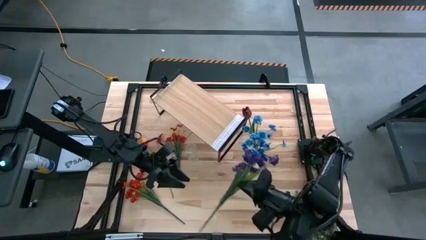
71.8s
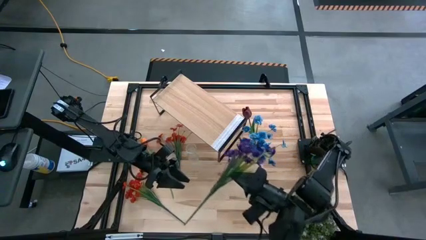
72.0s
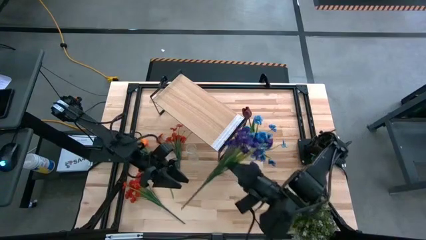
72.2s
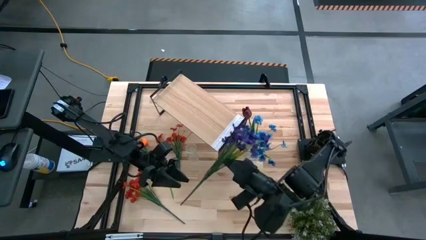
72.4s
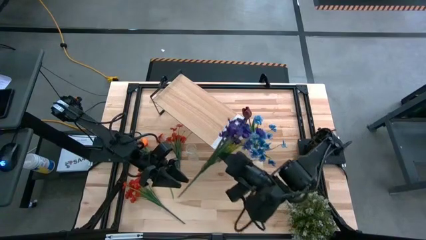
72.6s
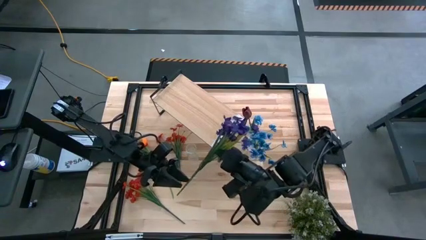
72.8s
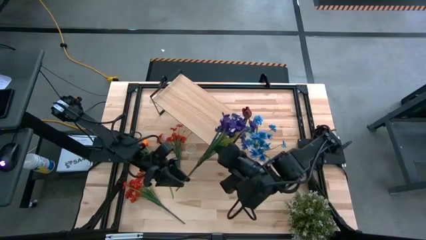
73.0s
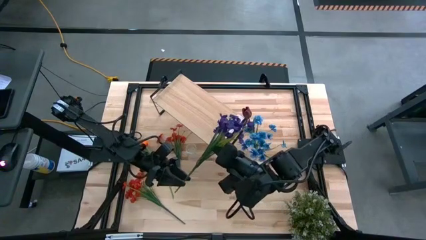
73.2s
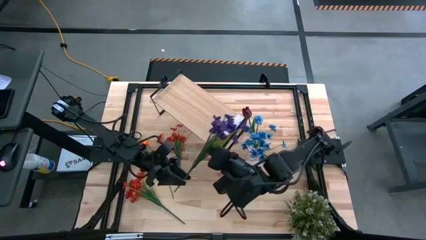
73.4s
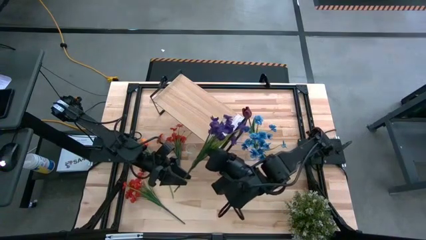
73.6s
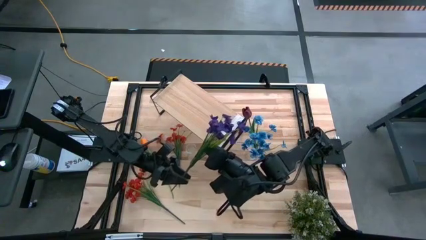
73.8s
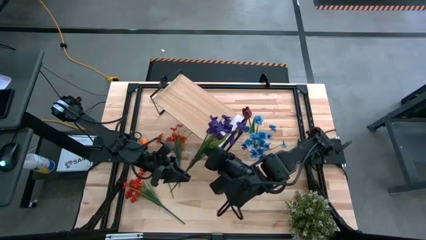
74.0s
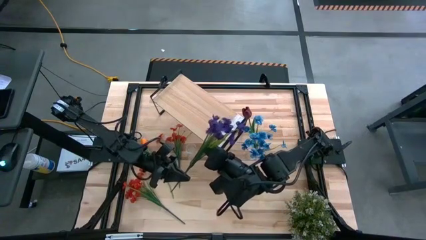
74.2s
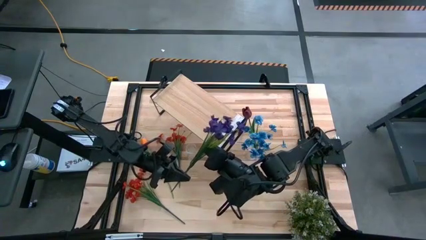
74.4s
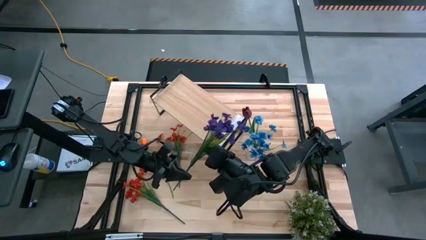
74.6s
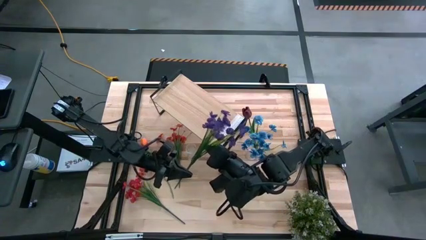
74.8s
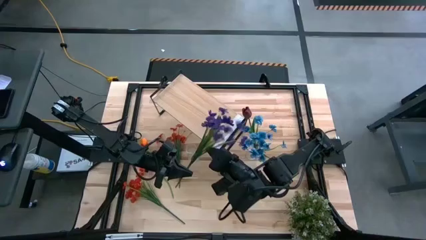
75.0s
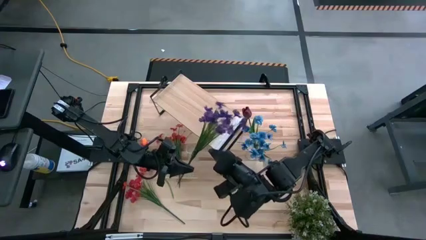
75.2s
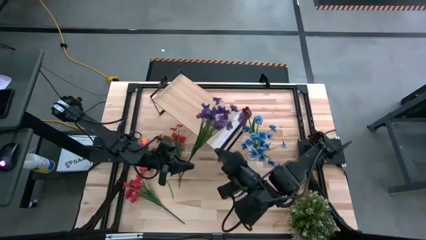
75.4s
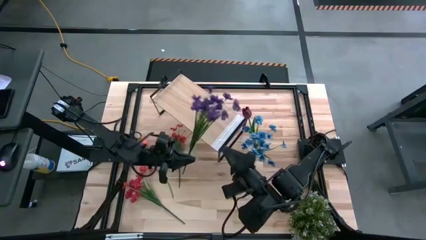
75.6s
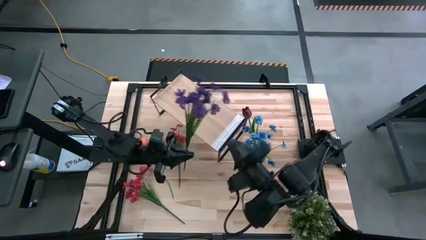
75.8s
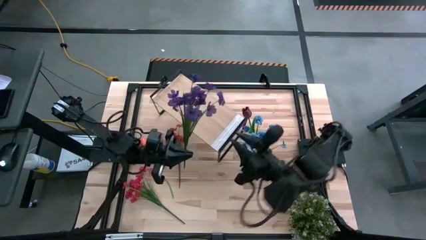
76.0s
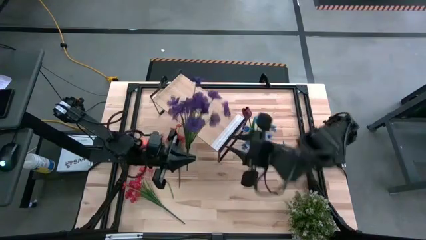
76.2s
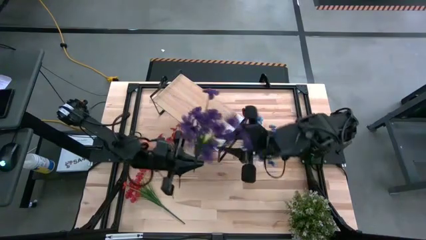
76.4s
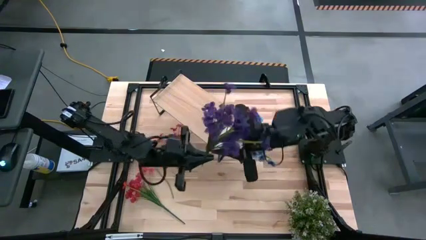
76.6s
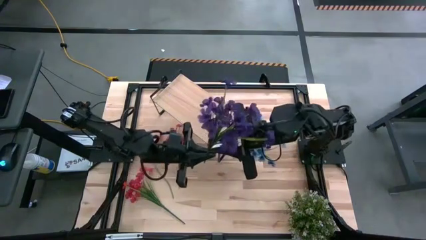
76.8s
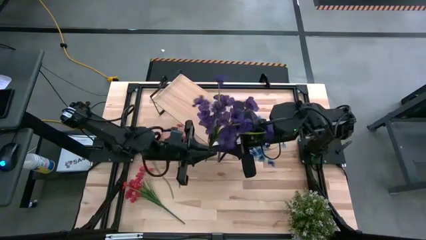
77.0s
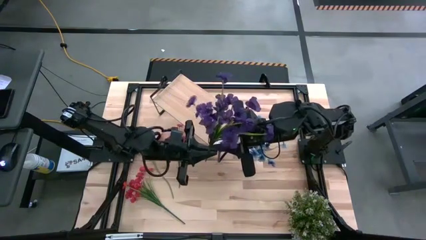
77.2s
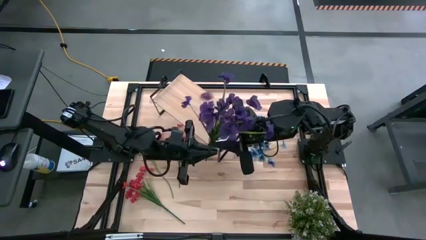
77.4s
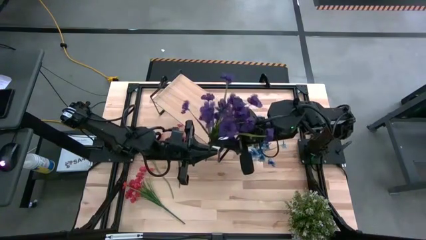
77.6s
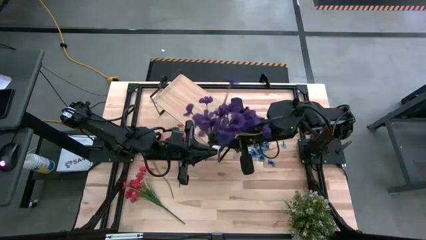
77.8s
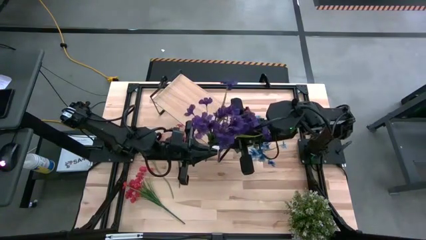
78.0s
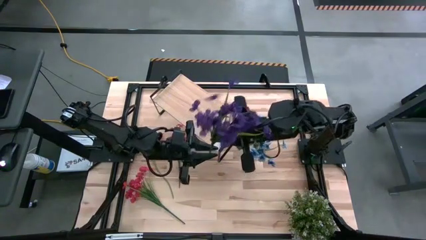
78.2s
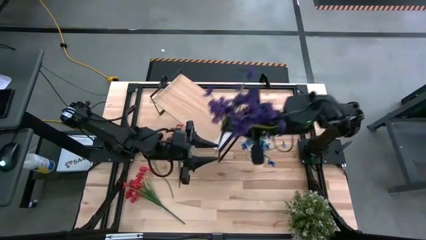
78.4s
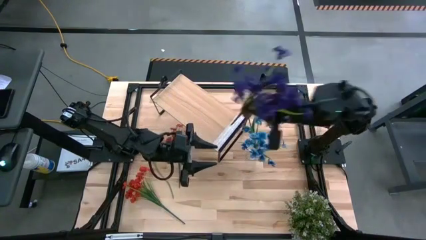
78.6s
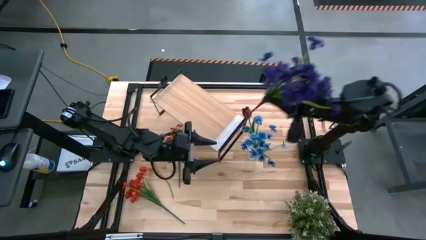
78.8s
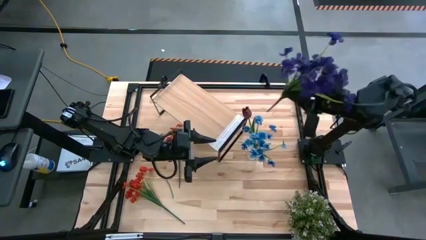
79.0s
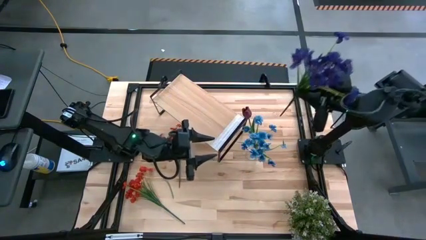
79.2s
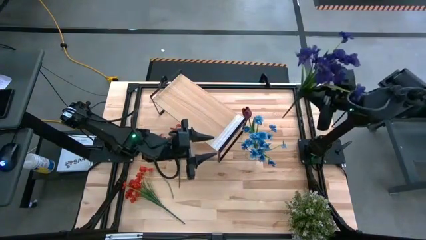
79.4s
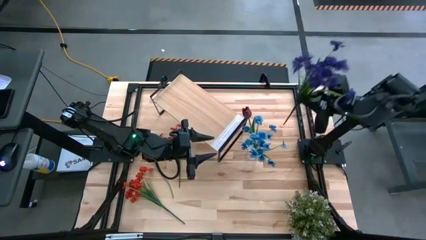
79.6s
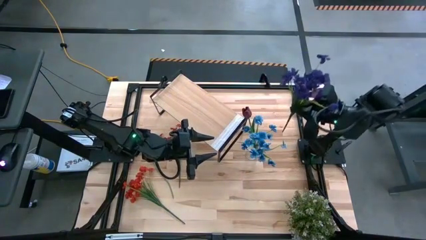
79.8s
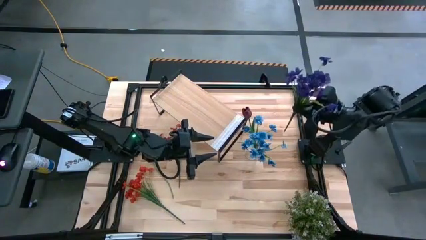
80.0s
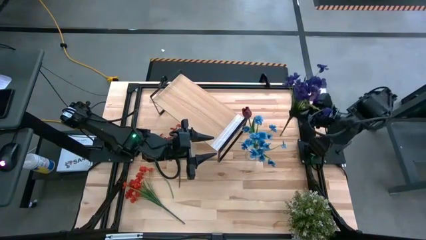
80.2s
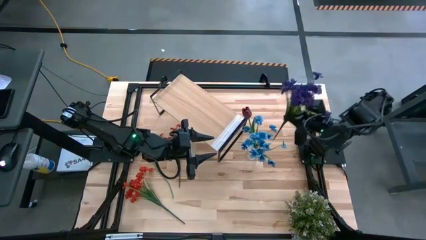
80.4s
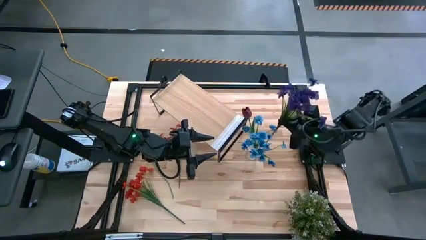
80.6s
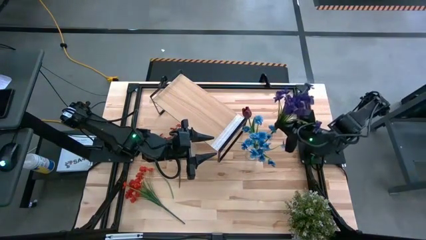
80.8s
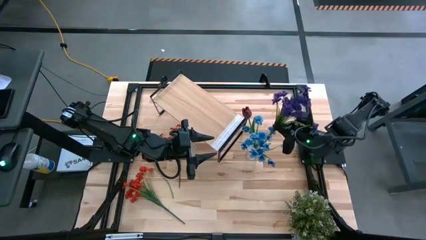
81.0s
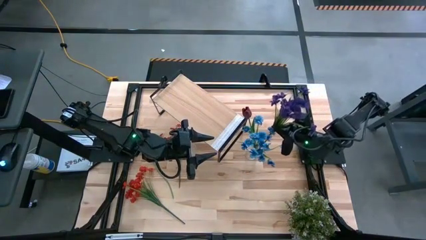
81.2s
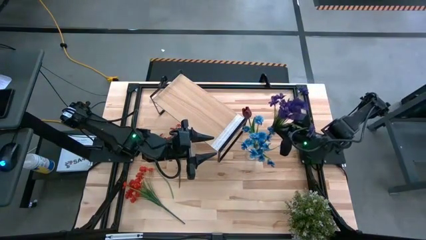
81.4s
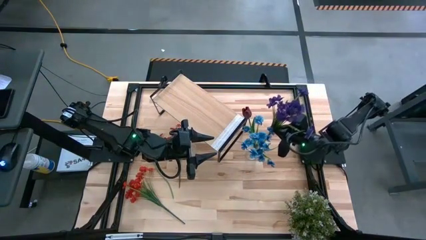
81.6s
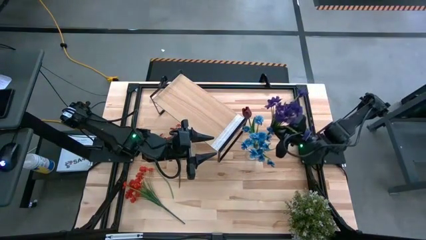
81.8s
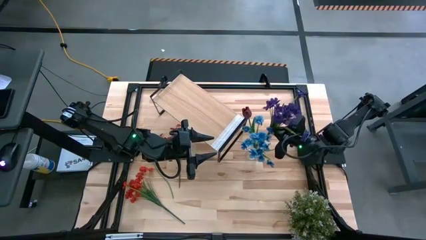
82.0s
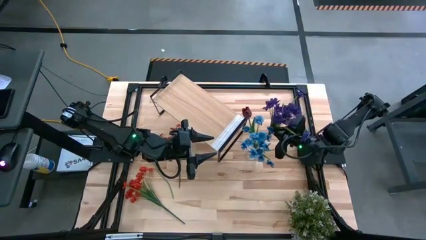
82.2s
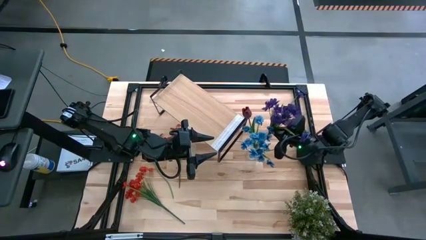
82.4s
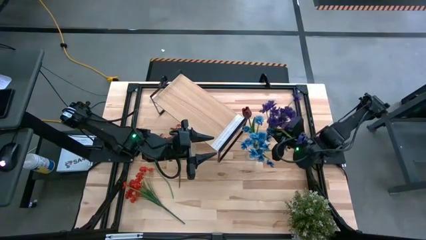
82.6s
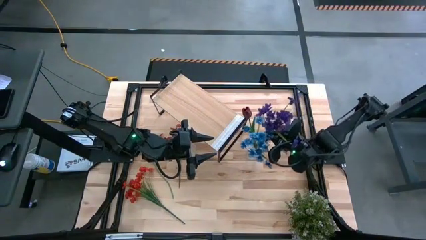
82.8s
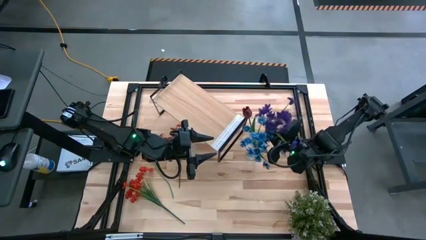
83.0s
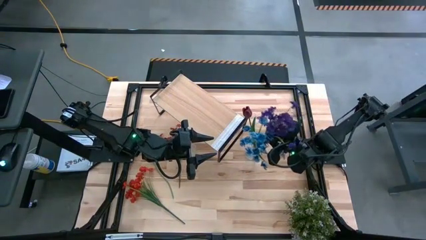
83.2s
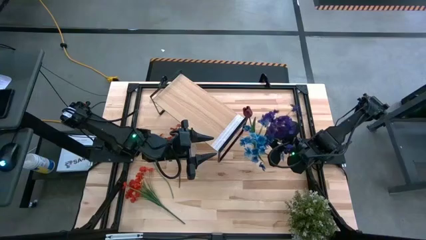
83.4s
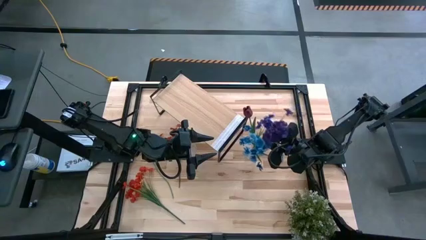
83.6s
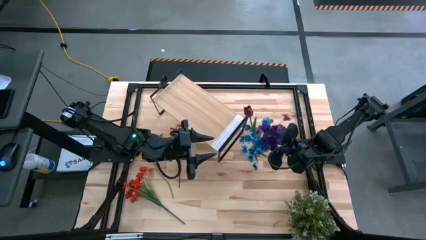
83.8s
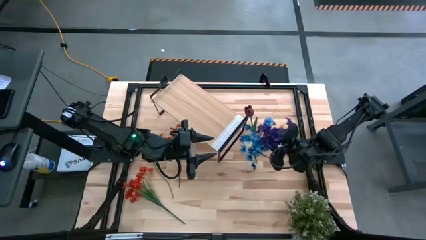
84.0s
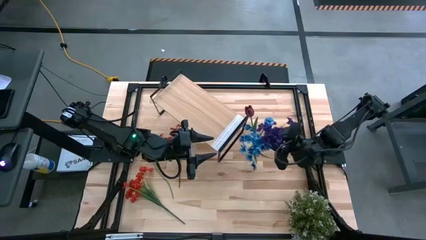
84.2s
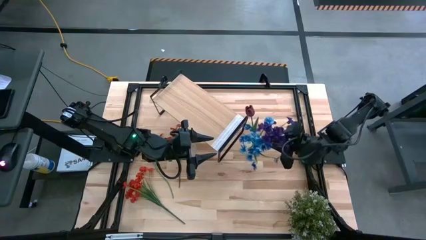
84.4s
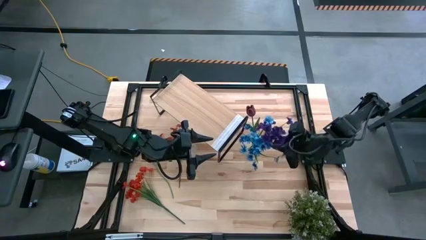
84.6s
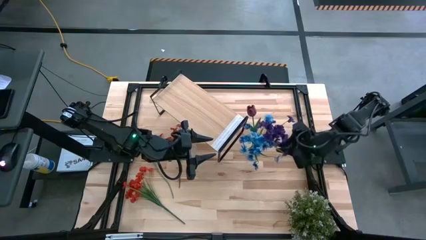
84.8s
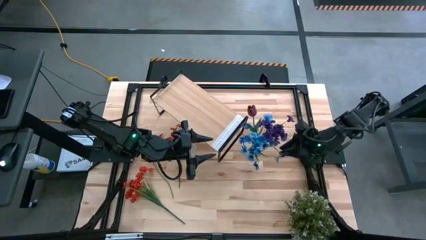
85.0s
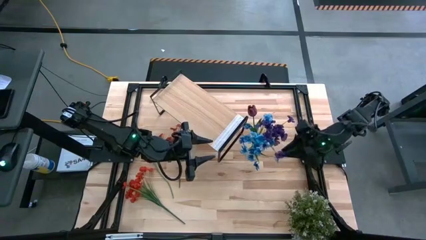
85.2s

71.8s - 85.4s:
Task: Pick and place flowers into a vace then onto a shelf
Put the violet flowers into the right transparent flower vase

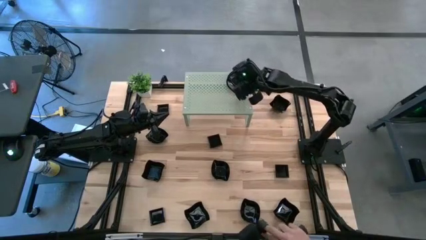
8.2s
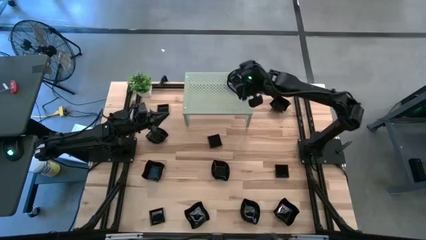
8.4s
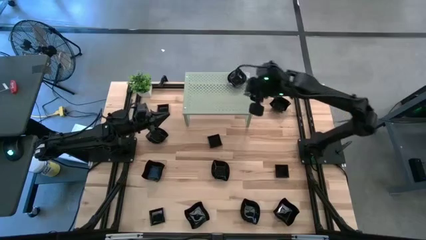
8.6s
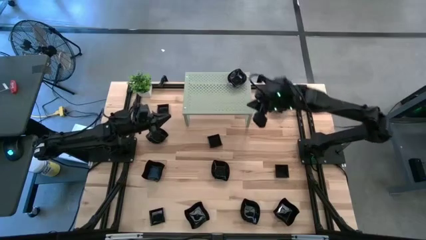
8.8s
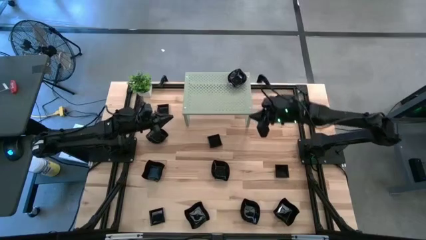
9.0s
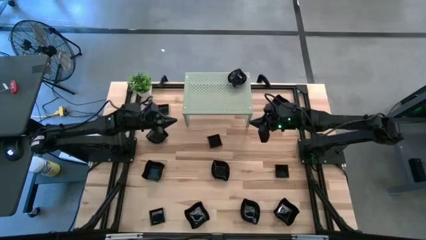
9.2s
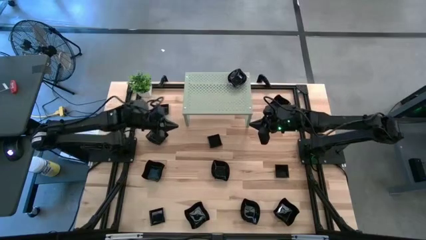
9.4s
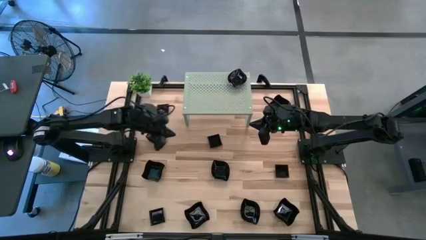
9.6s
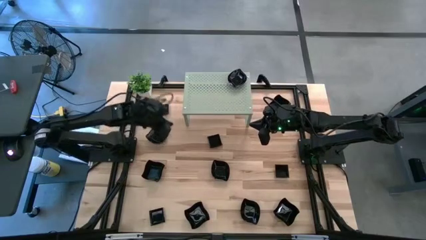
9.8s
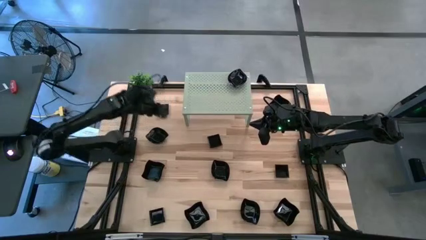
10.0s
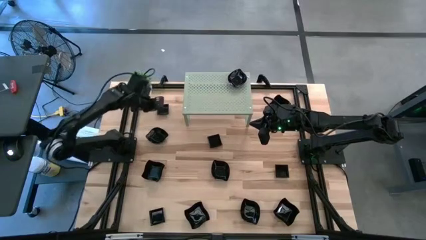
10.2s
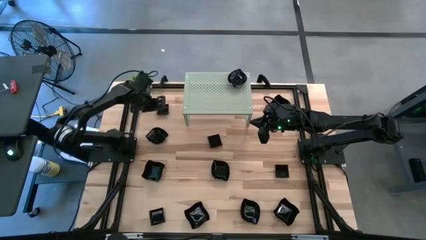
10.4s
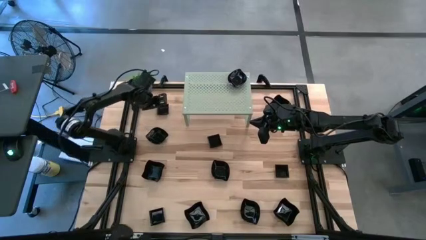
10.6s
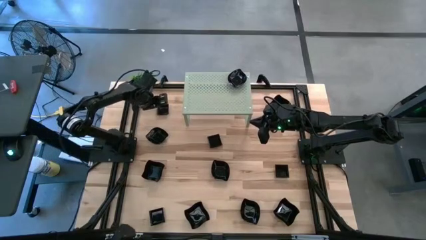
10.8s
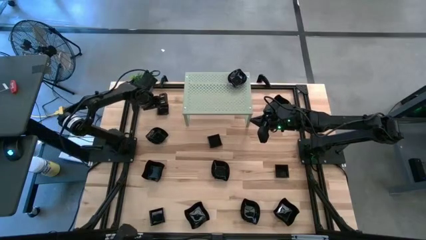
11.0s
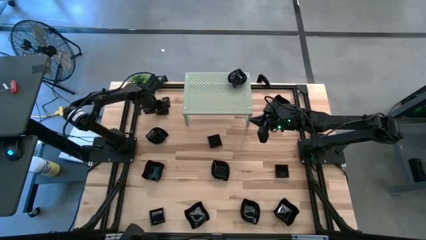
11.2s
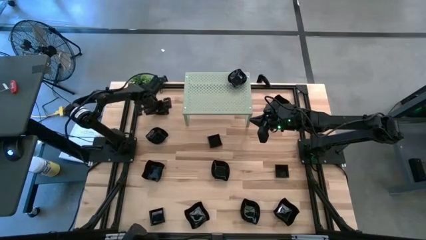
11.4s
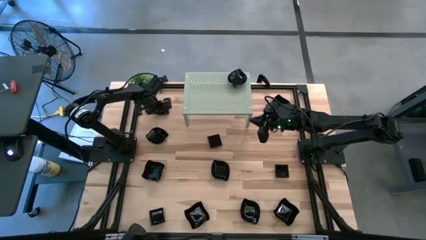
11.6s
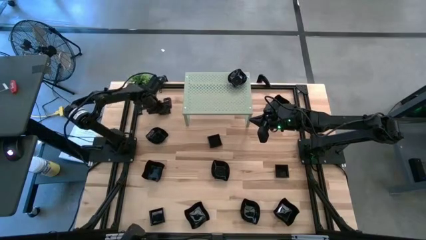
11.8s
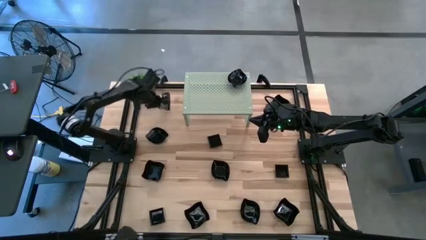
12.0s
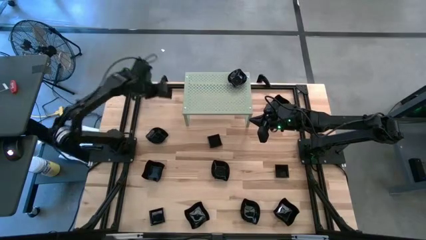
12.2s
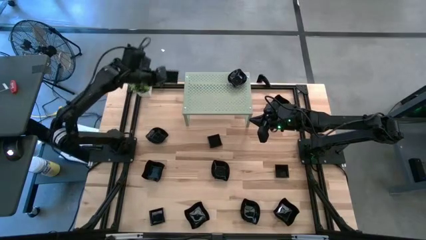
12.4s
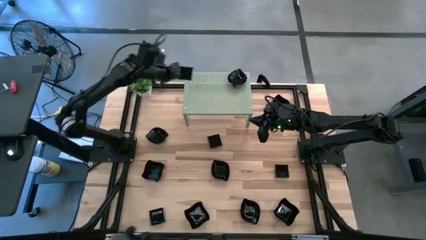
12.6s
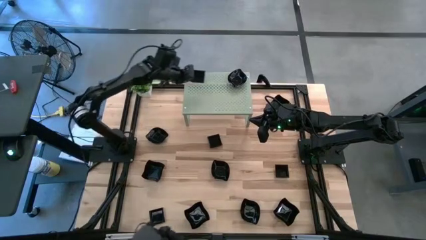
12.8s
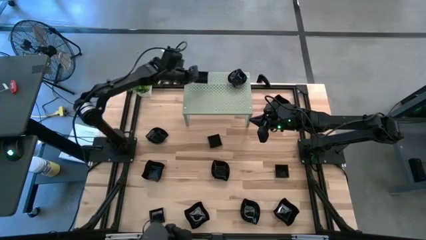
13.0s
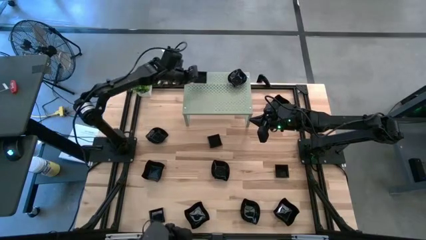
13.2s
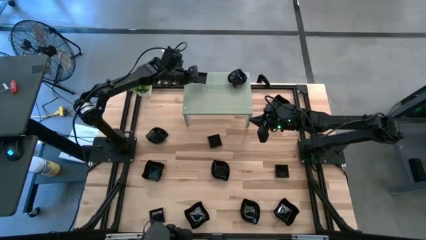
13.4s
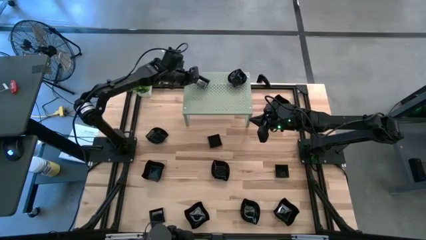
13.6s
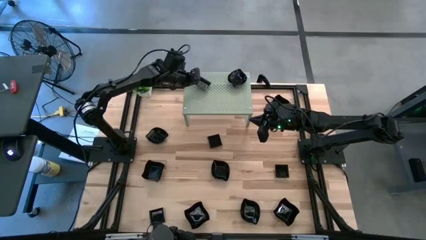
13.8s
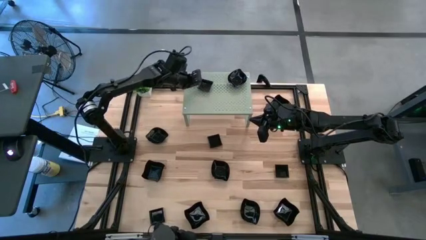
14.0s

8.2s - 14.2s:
Task: Pick & Place Mini shaped plates
Put the black square plate on the shelf
